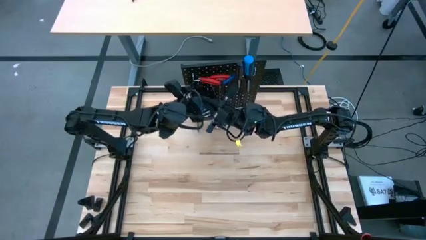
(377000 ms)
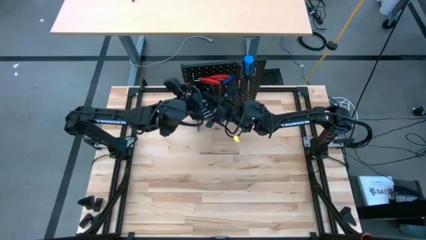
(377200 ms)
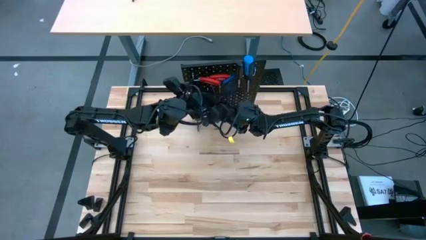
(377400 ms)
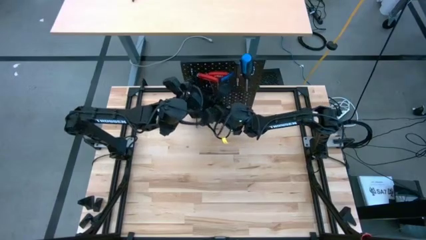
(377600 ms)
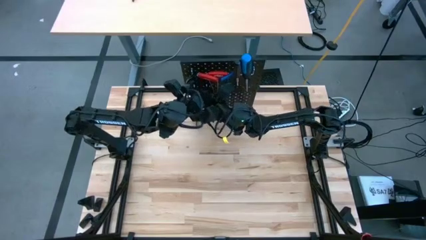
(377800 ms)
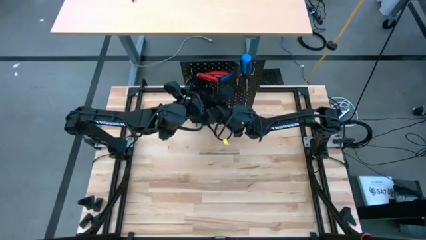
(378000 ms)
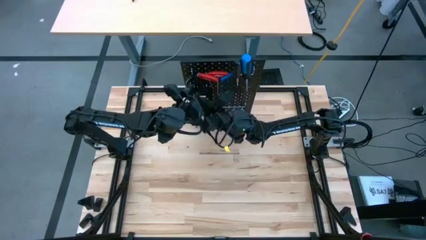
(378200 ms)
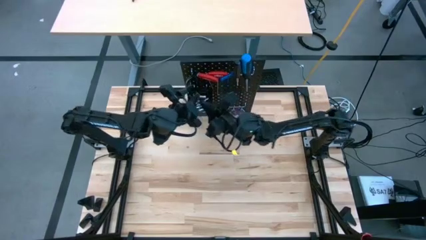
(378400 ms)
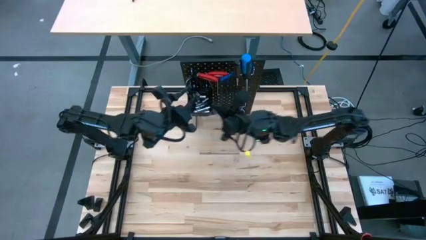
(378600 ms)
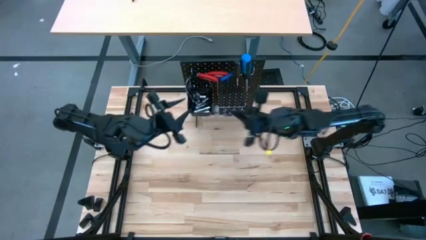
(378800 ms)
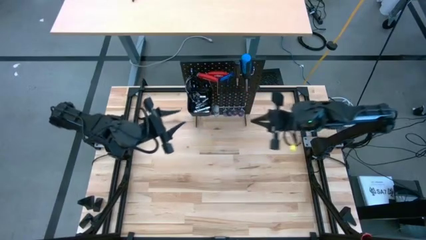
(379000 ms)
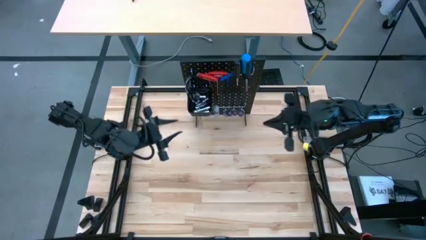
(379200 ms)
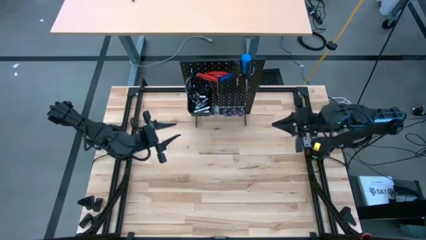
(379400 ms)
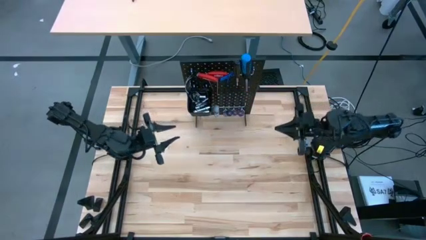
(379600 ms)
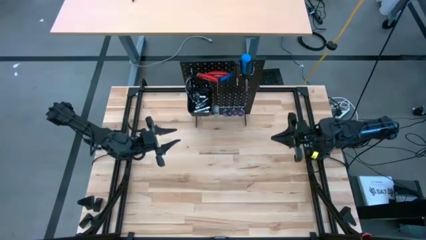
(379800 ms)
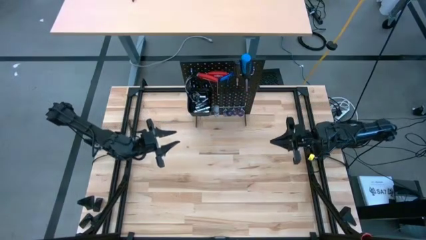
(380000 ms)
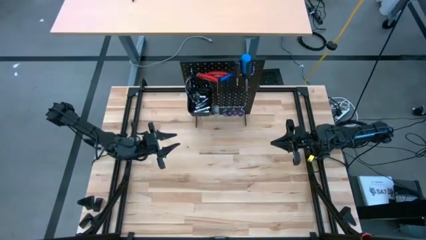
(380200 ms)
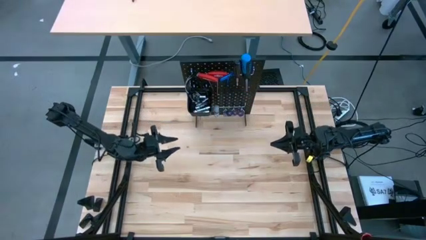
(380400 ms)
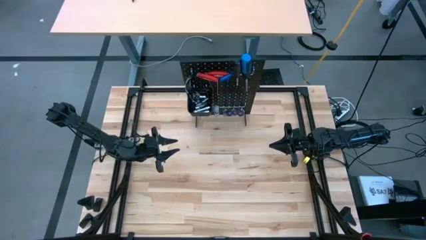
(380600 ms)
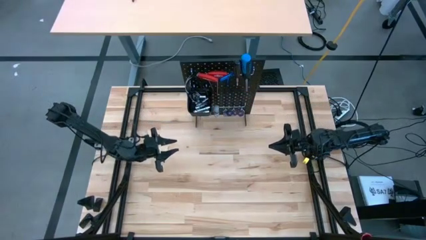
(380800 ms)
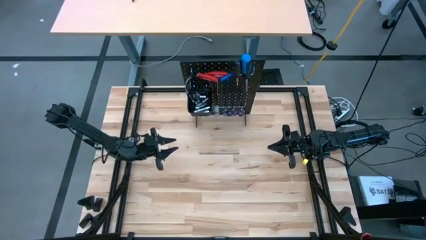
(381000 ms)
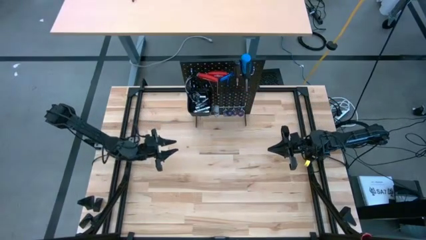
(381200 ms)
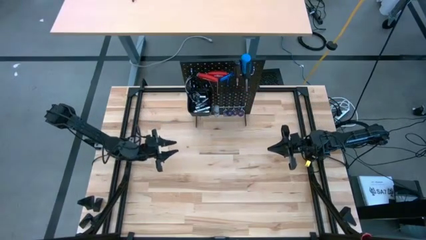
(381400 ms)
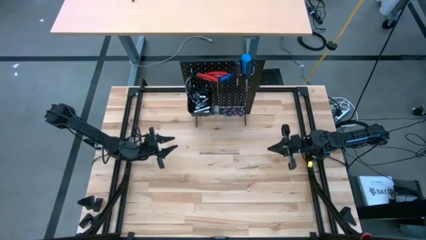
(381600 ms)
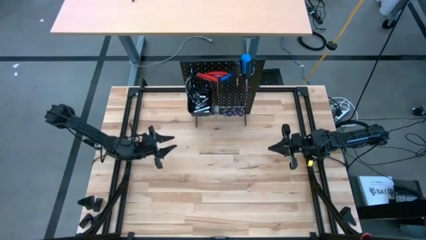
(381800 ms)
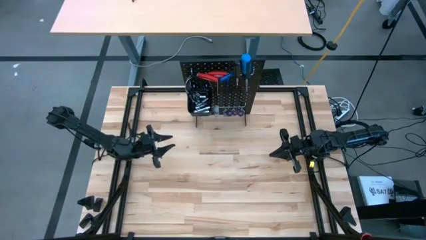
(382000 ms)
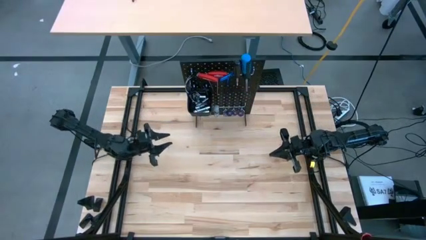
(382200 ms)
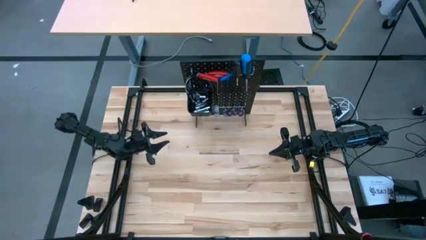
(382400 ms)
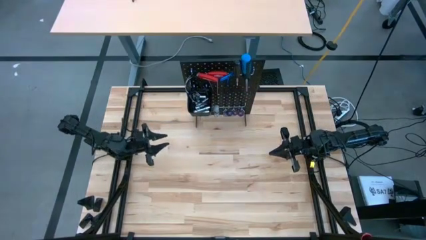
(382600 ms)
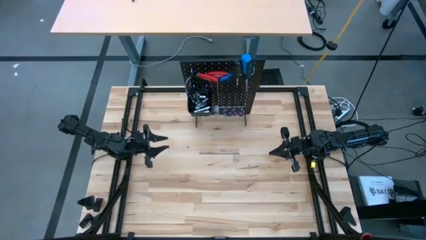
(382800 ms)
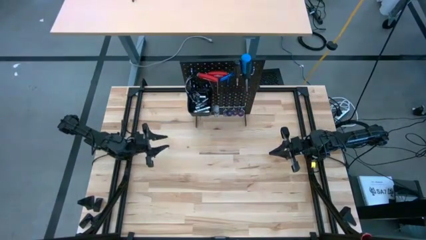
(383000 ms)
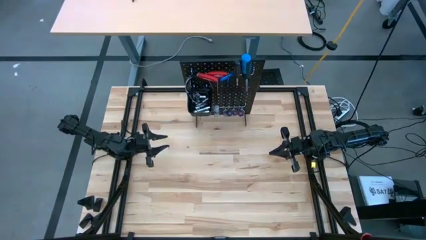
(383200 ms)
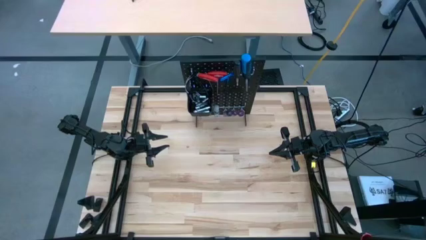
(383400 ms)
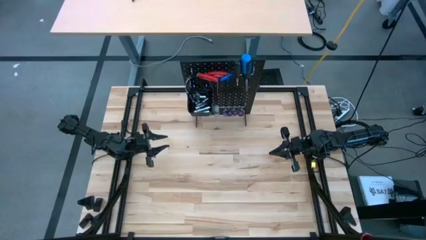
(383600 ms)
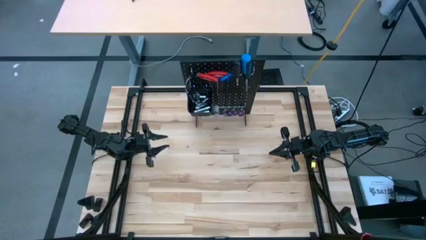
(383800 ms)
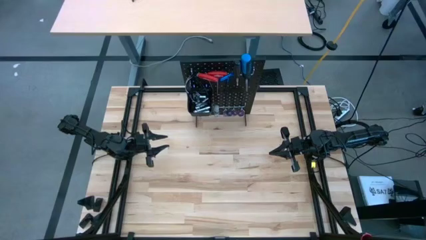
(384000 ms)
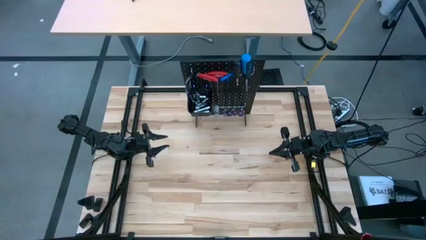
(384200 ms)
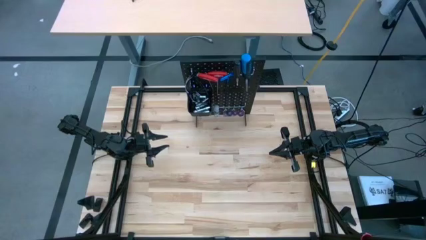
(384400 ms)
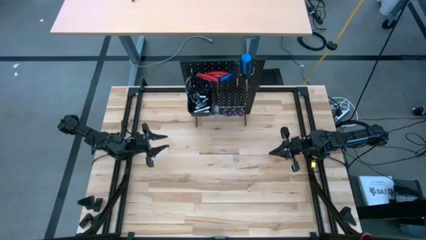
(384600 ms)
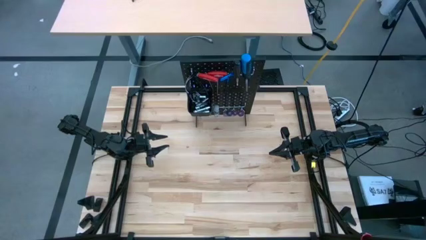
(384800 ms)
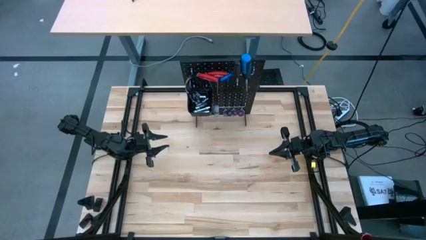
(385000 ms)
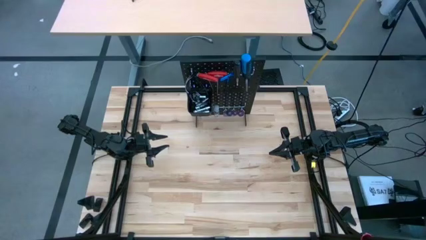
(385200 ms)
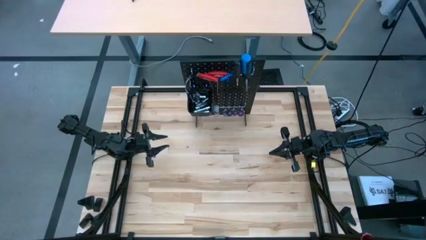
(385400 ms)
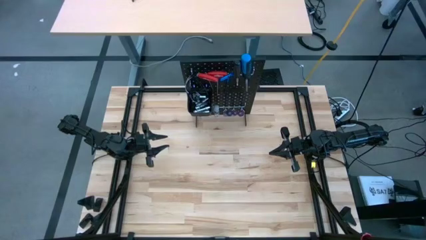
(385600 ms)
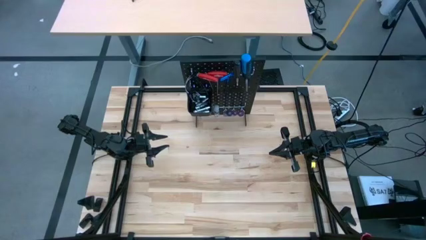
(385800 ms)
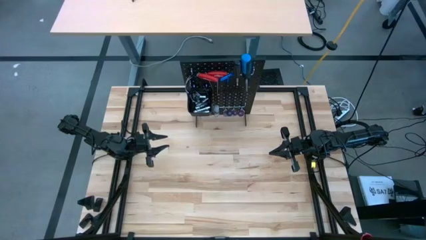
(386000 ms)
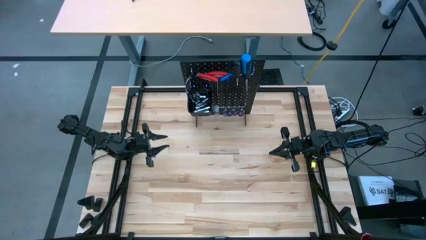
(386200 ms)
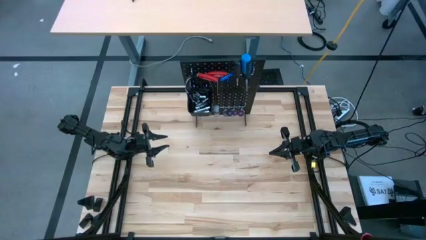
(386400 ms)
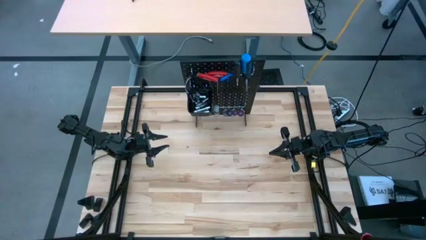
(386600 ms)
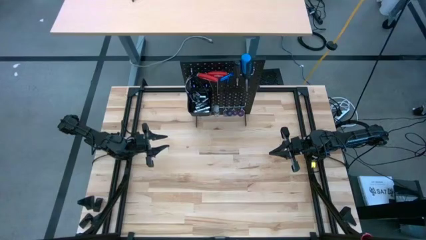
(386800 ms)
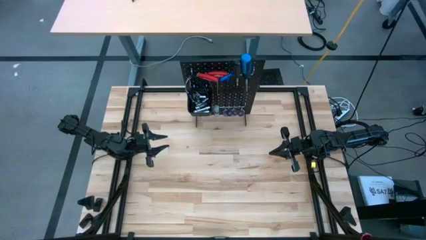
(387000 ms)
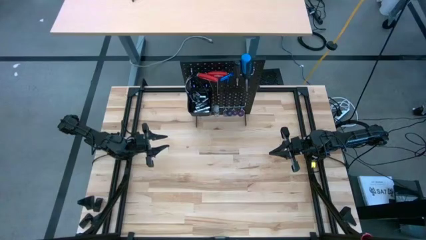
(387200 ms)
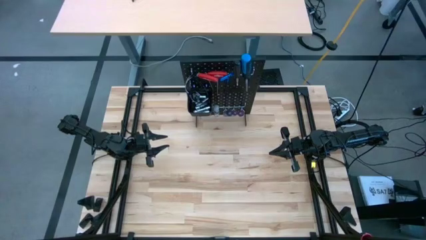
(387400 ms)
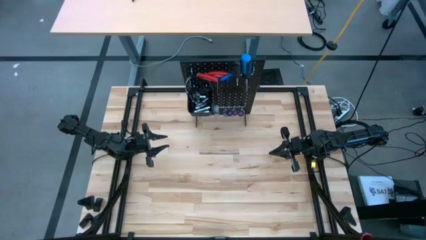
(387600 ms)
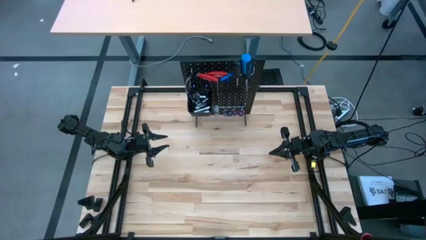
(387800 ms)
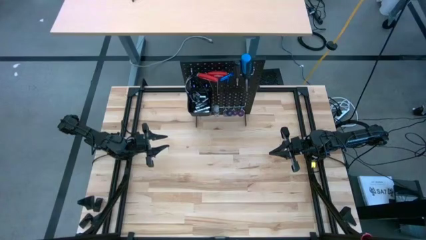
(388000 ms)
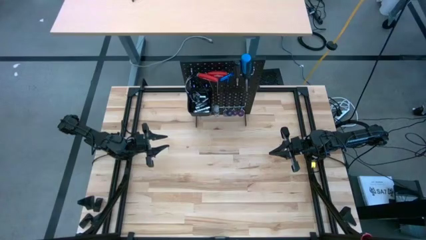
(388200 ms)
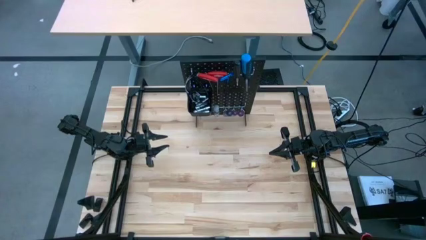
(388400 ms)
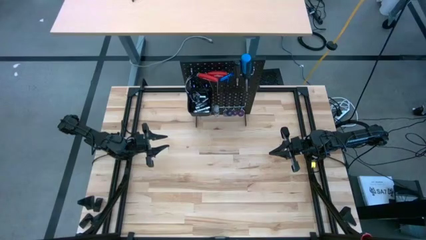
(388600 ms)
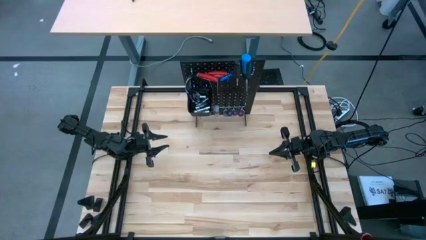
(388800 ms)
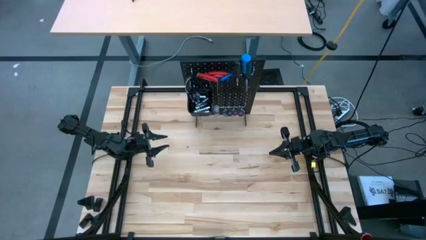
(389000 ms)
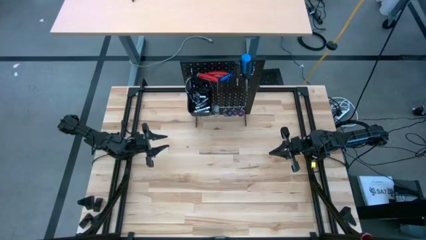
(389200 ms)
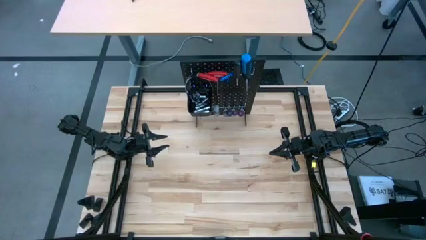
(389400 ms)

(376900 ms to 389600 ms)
Task: Hang tools onto peg board
Return to Home Position

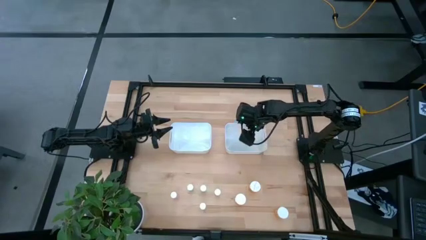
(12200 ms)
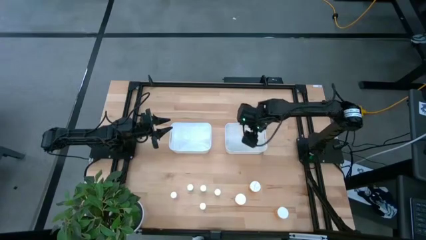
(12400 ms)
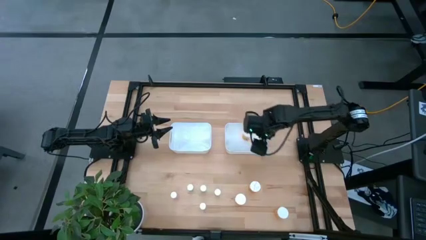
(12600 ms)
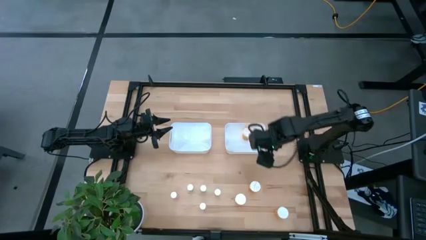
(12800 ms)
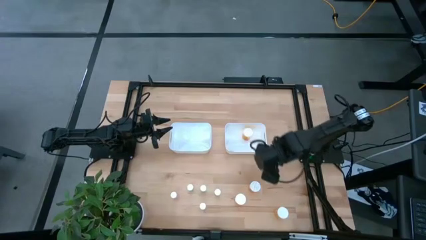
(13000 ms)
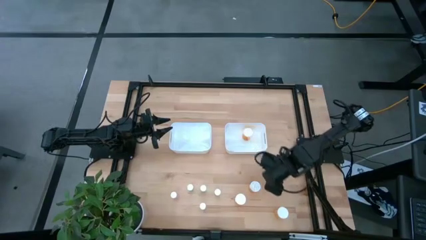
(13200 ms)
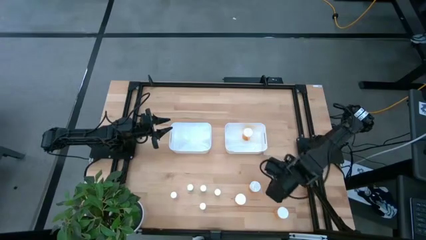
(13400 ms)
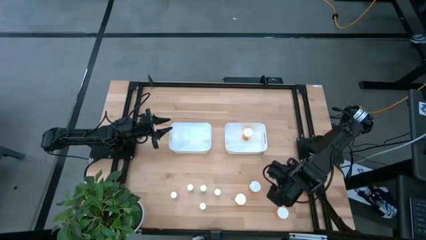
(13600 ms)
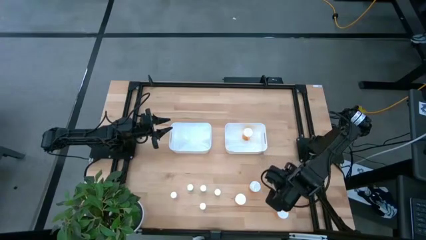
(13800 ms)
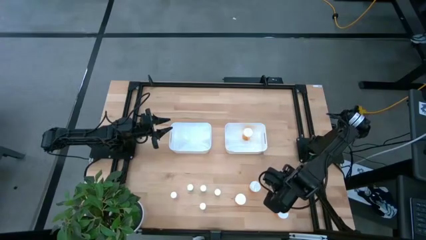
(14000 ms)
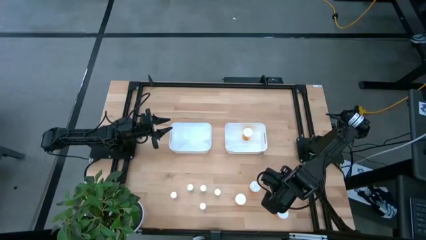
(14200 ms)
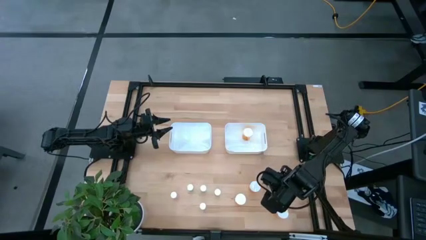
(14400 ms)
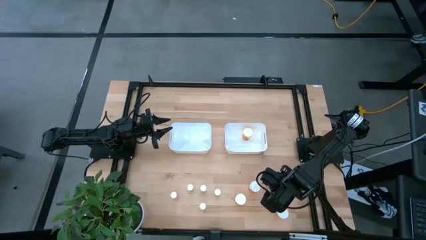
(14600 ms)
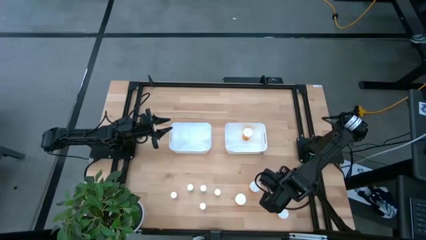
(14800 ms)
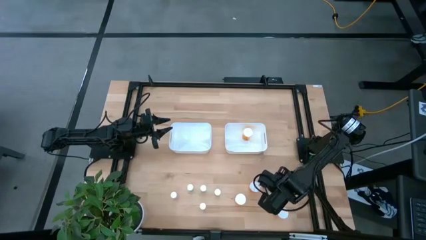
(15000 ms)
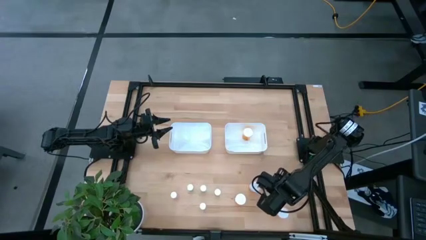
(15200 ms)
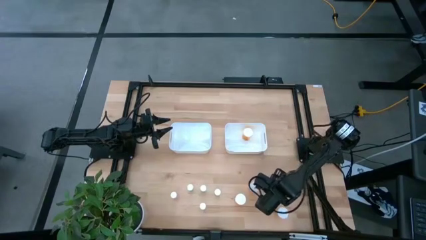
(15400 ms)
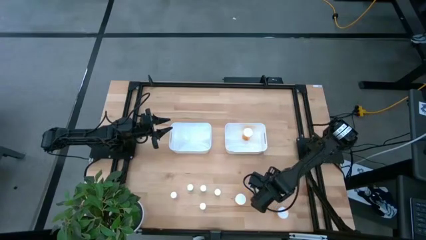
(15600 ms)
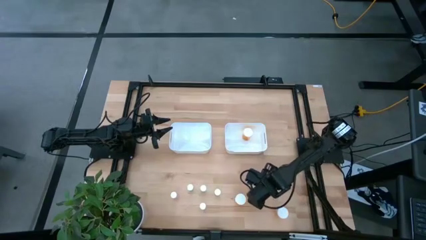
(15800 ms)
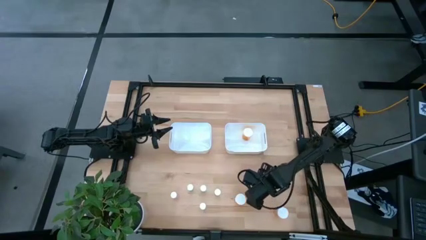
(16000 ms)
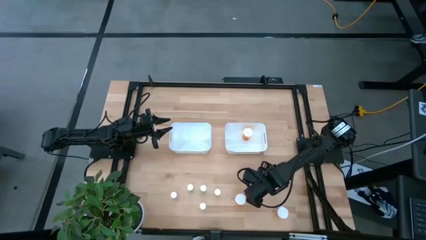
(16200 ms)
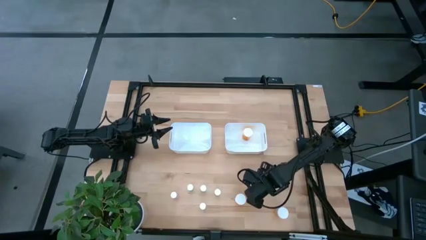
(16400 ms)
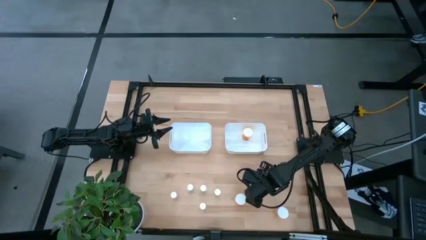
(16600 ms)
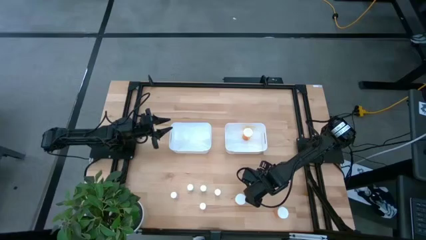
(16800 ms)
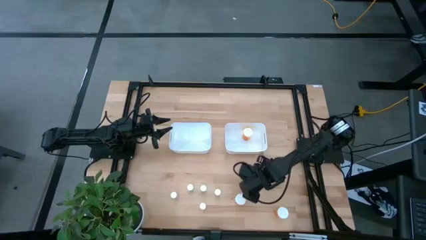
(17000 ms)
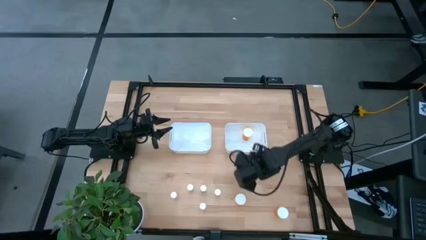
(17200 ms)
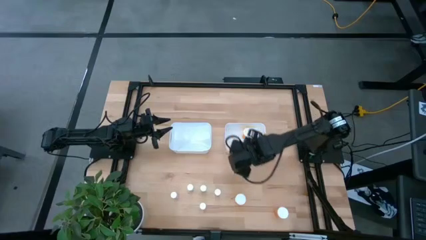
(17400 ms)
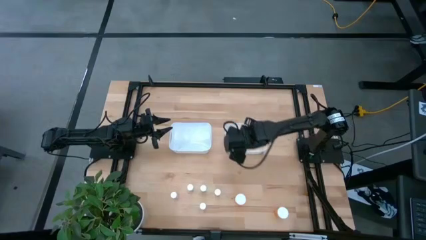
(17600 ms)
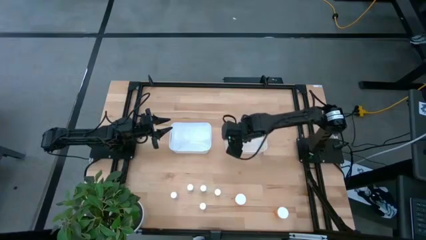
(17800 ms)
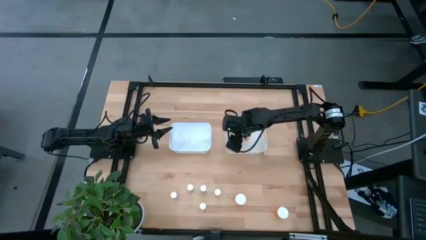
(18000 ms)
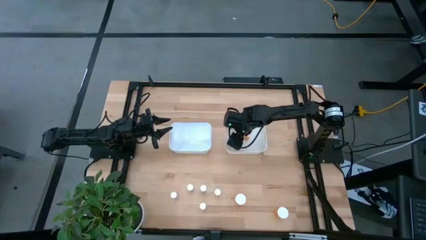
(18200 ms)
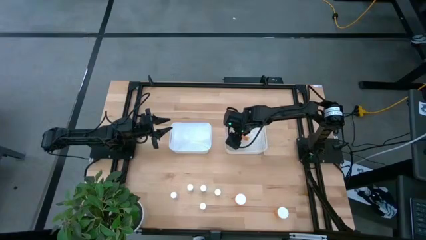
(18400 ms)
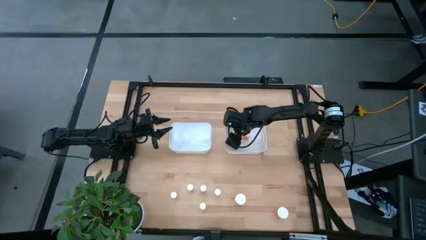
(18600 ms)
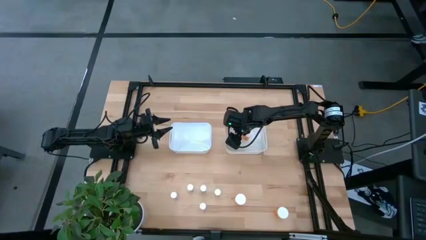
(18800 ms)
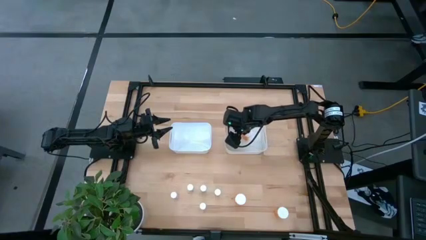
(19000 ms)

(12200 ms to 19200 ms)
Task: Pick and place medicine bottles into bin by pill shape (circle, oval)
Put the large orange pill bottle into the right white bin
